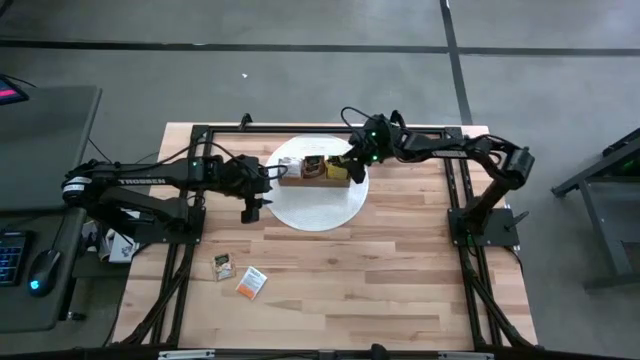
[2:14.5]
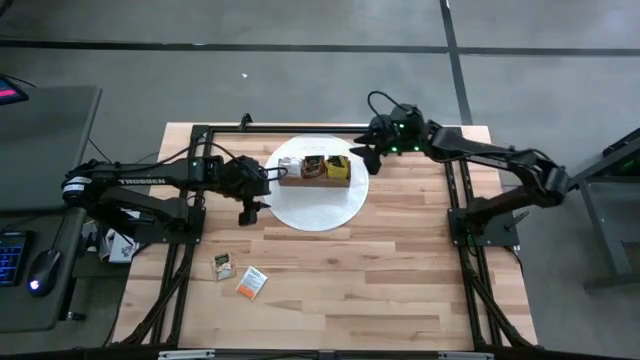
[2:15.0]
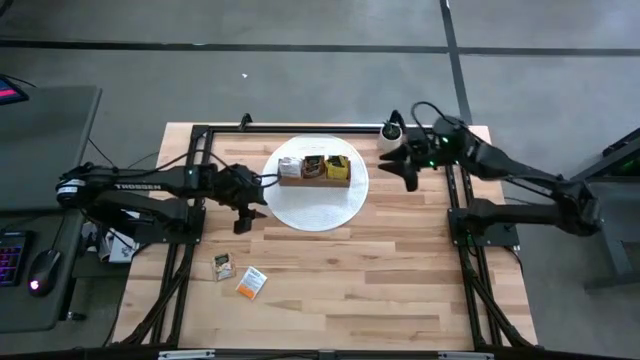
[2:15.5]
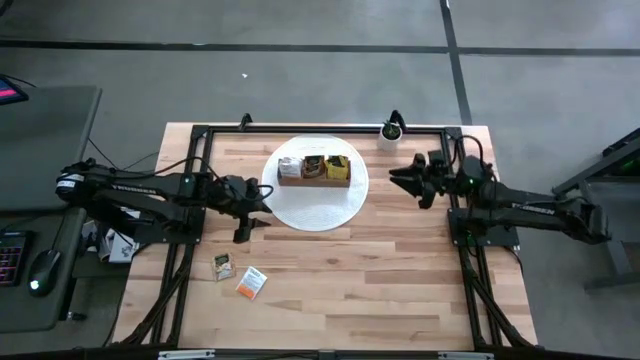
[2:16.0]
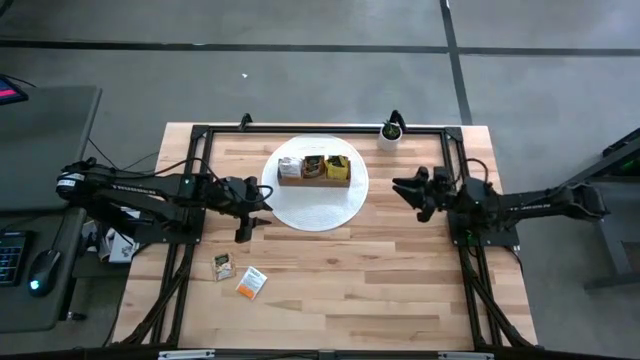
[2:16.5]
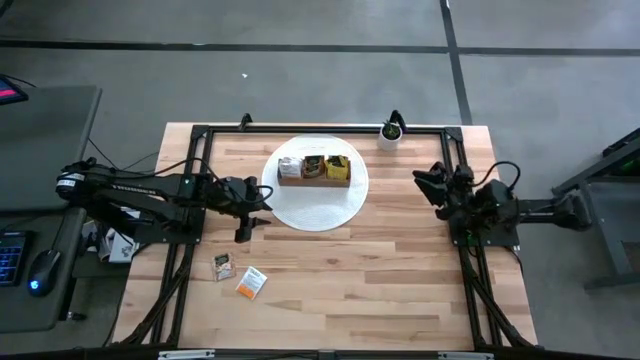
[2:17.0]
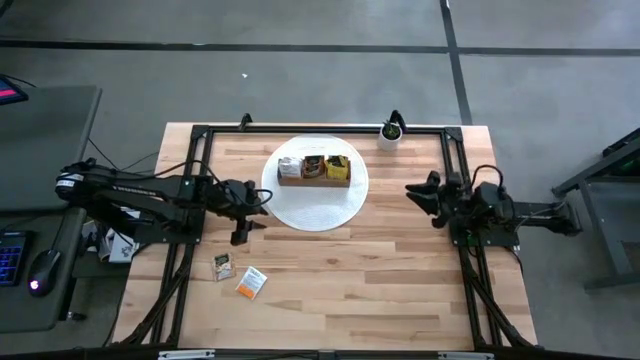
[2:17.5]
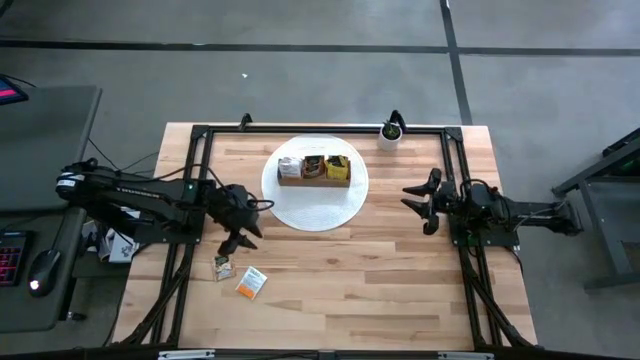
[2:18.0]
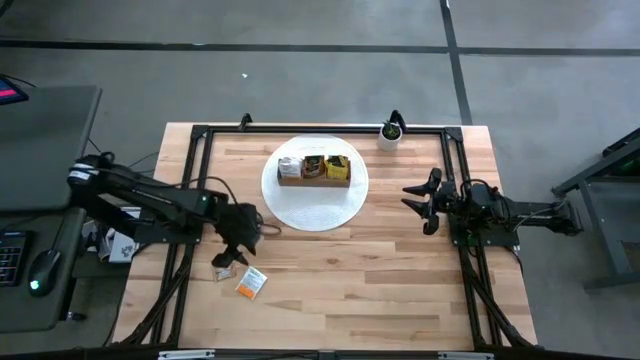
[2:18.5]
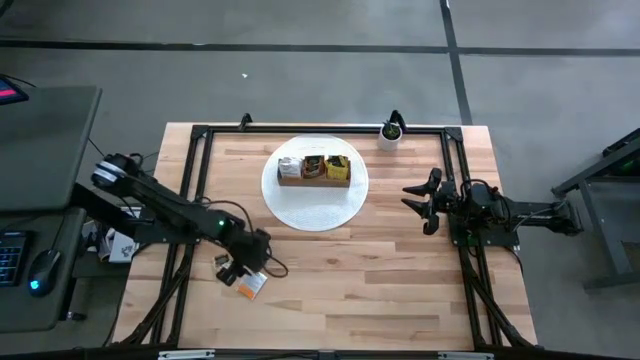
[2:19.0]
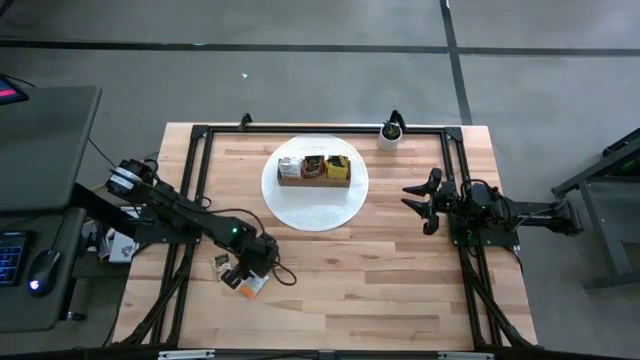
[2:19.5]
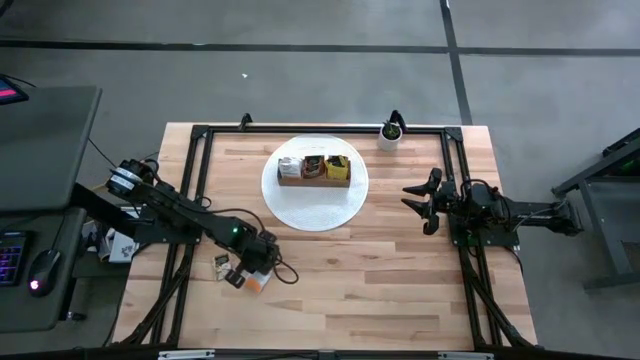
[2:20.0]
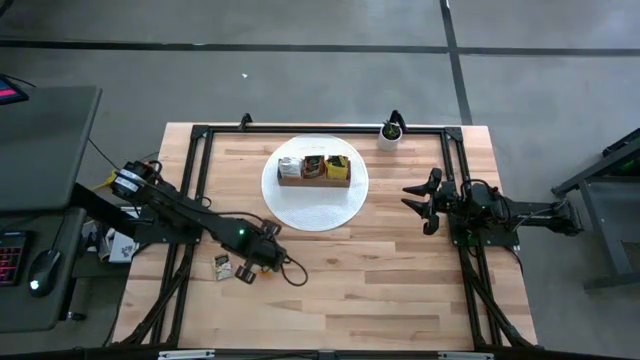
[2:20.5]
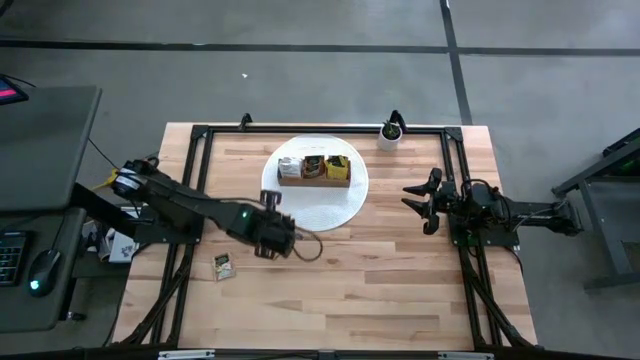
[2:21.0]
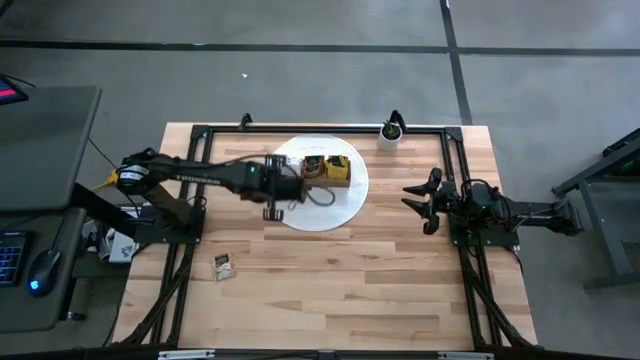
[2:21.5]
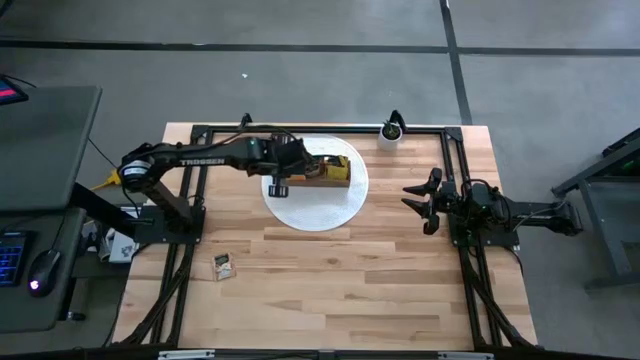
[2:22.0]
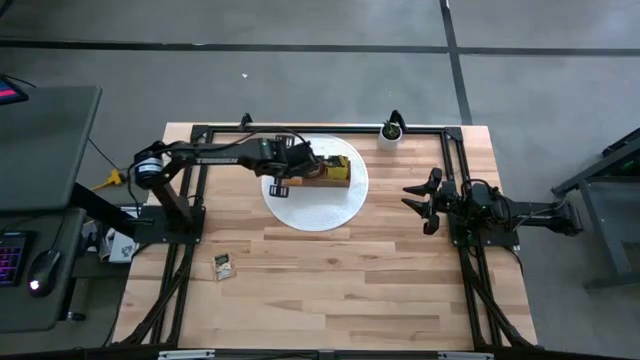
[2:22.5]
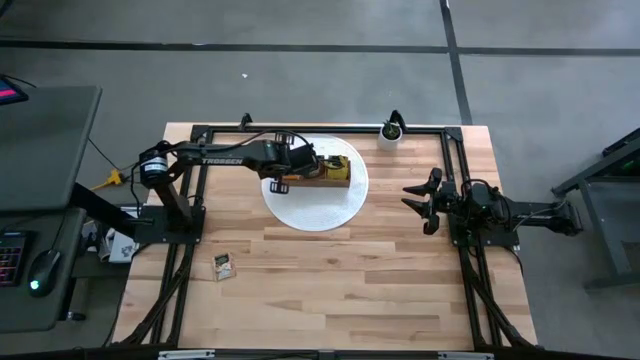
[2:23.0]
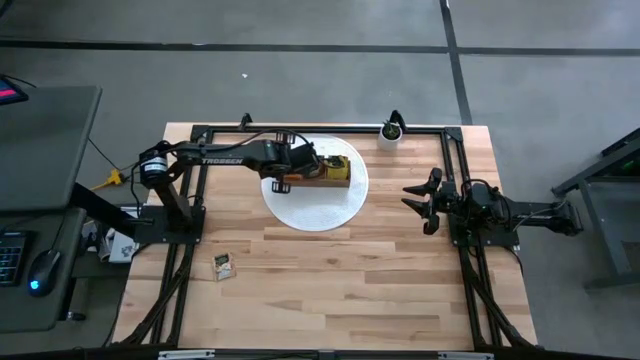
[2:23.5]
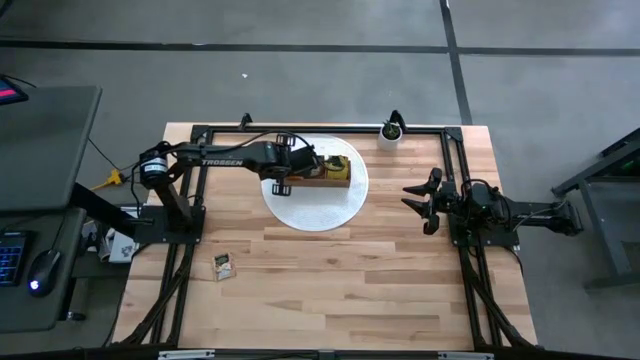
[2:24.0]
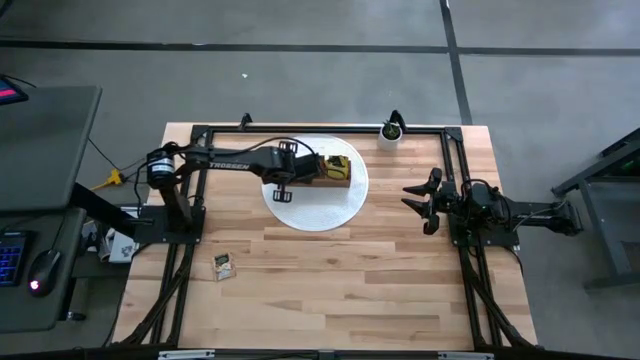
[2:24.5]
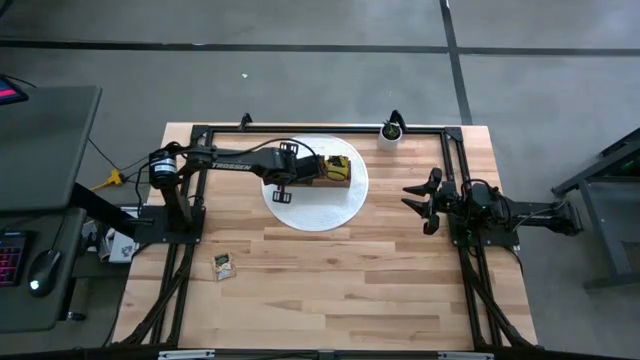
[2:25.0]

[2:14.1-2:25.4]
Task: Pick & Place Tea
Put the white tea bag into the left section of the wooden organizer

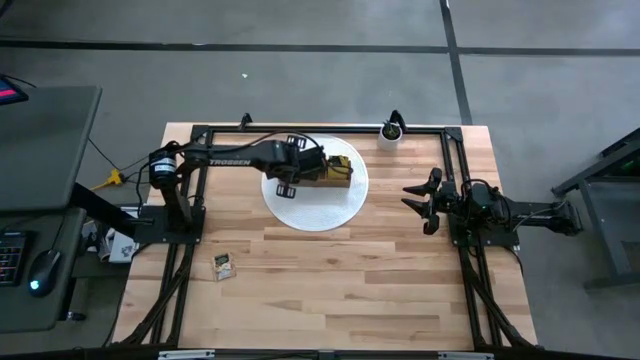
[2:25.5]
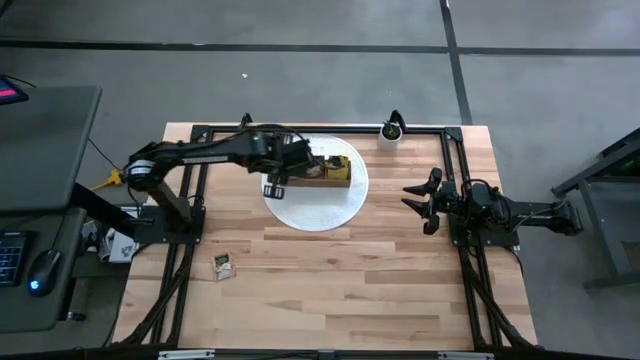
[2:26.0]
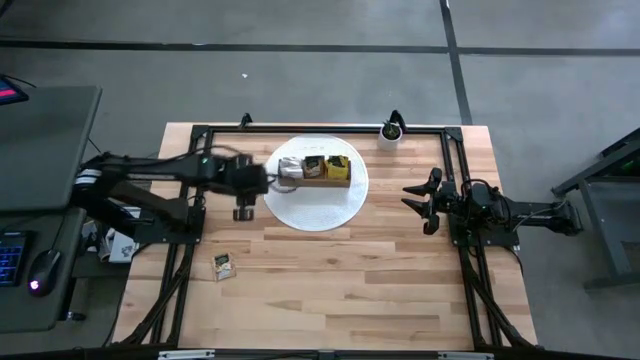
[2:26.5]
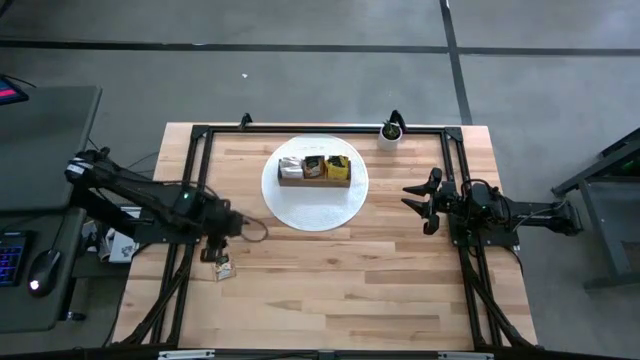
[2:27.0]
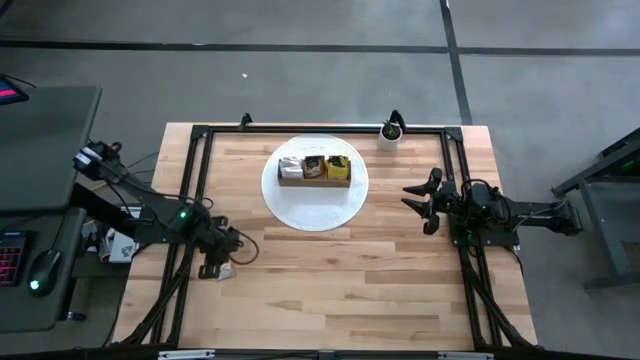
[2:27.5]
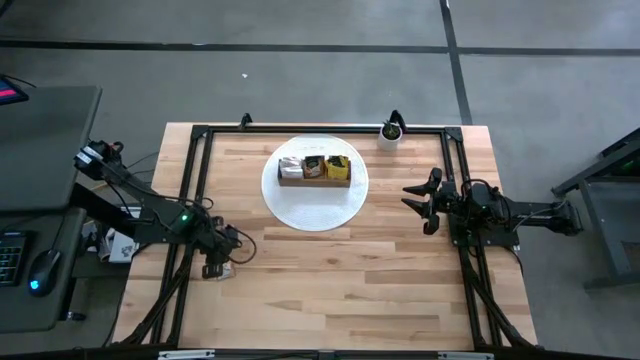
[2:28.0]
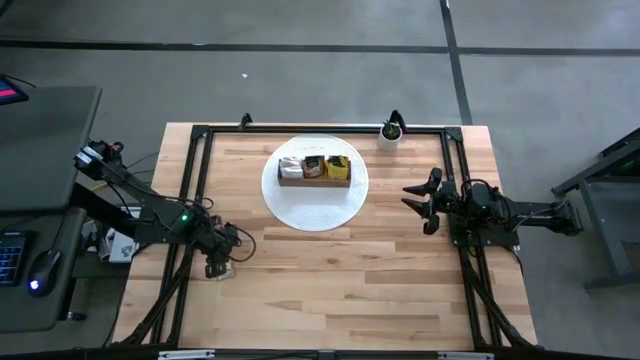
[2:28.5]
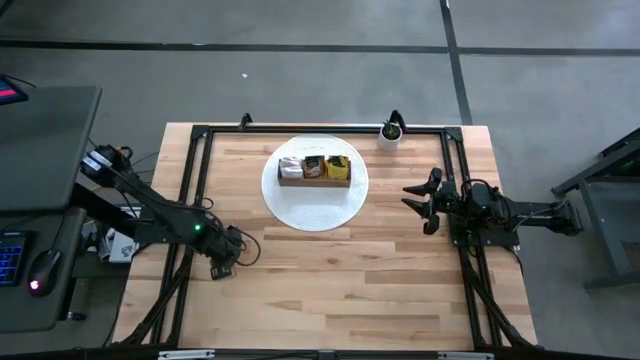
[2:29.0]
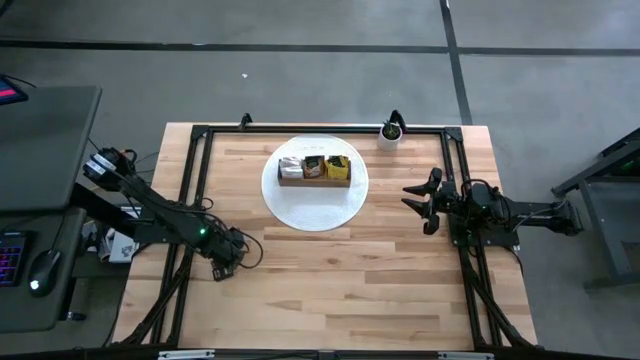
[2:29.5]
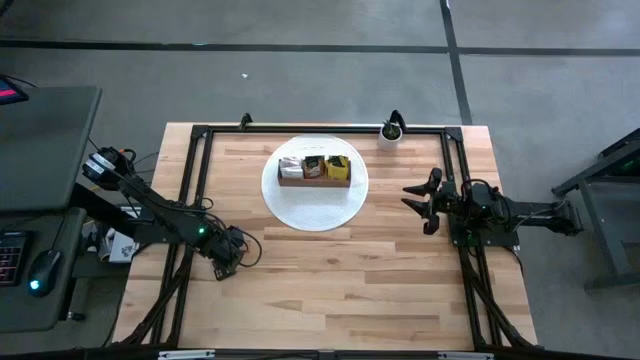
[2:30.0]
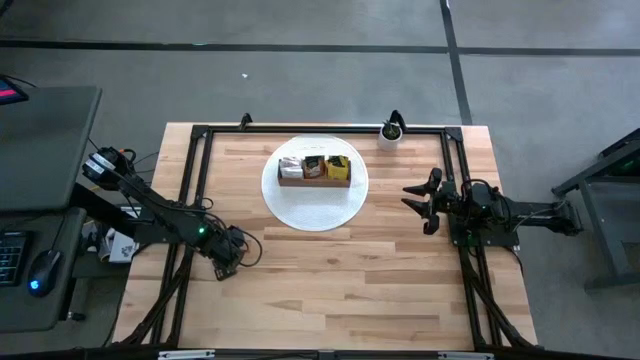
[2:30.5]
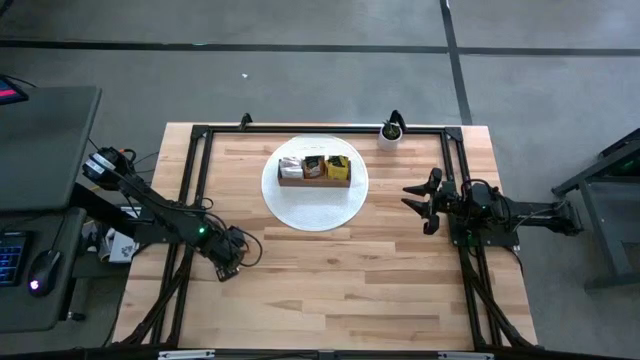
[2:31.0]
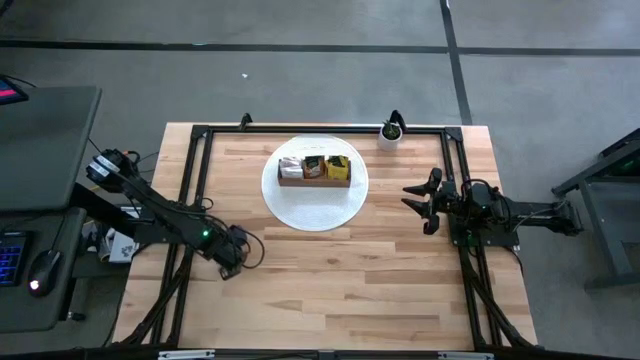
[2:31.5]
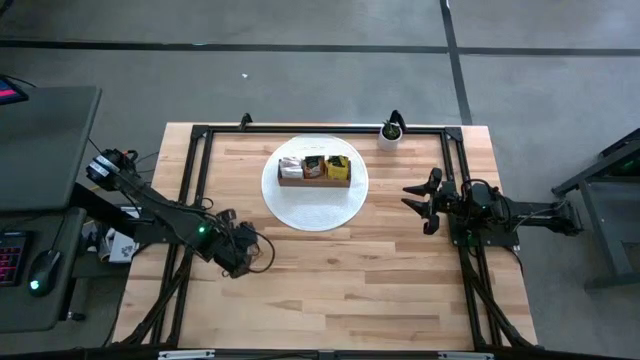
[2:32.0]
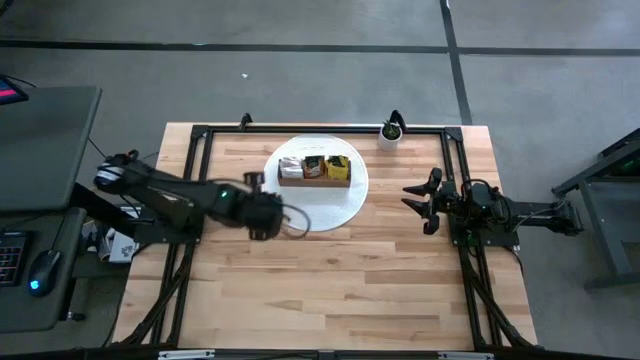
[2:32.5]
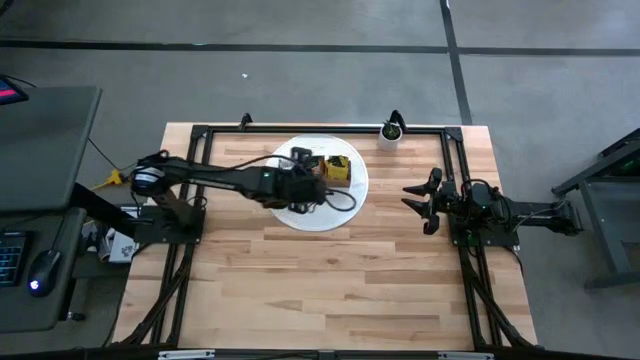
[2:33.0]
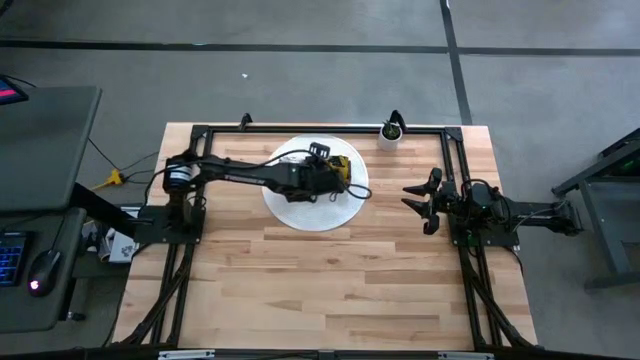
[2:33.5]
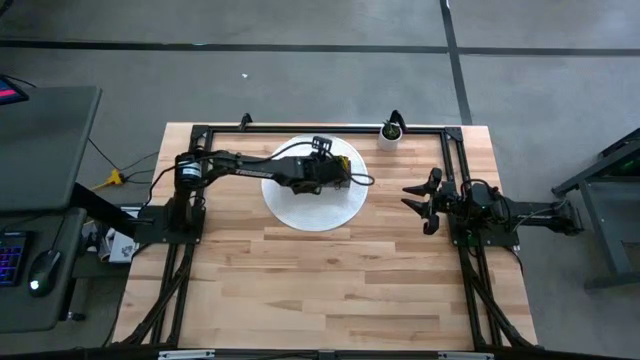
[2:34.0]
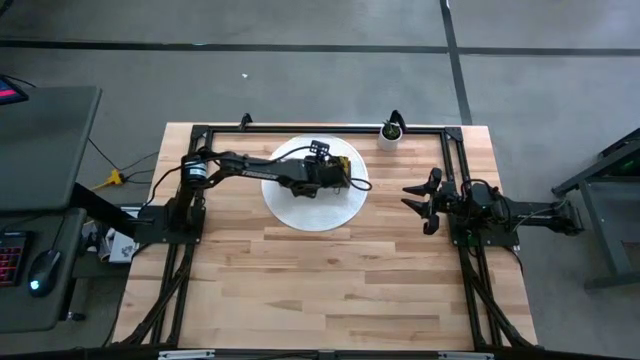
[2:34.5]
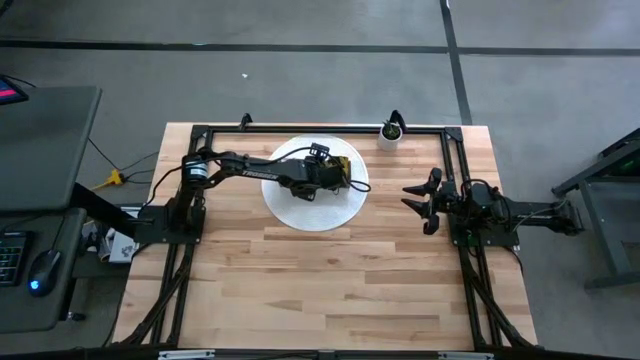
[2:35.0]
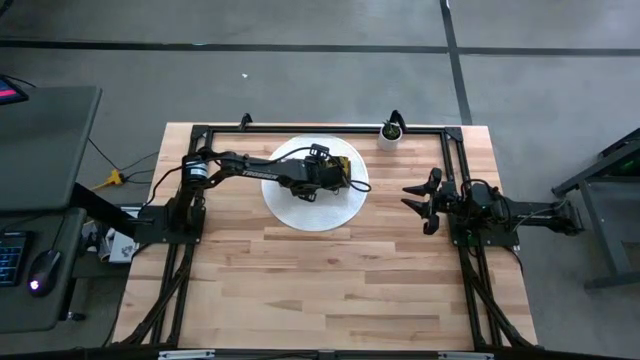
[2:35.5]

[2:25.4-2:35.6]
Put the brown tea bag into the middle section of the wooden organizer
